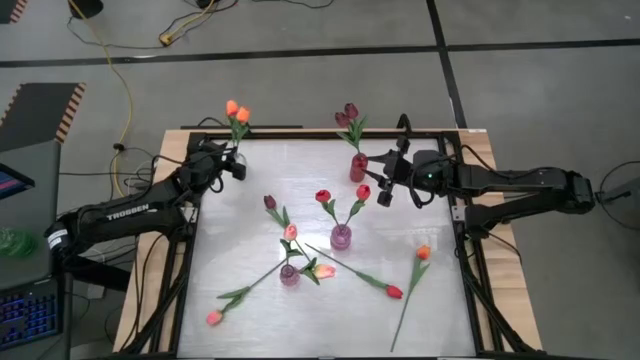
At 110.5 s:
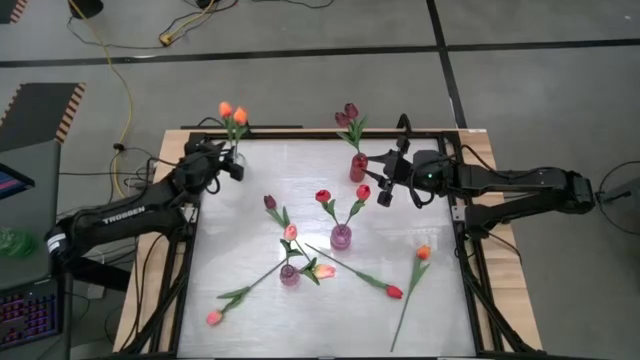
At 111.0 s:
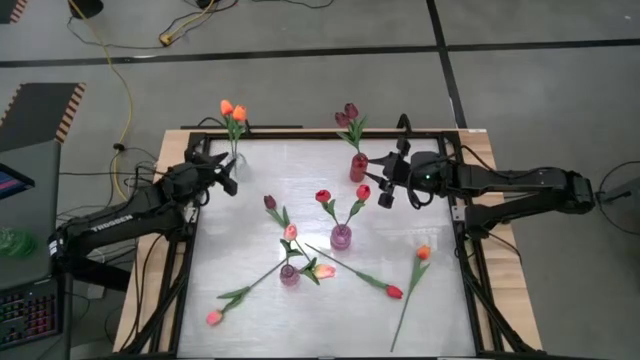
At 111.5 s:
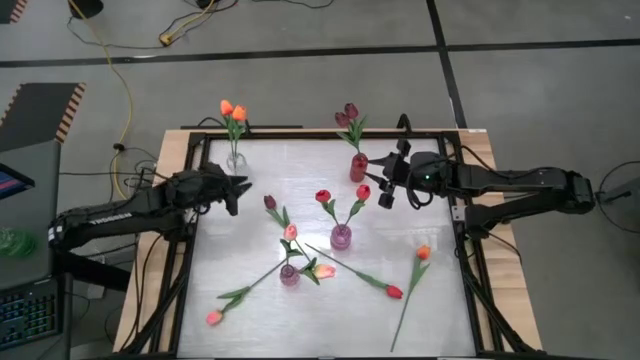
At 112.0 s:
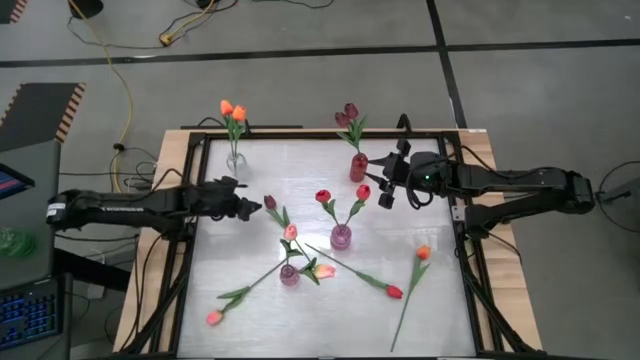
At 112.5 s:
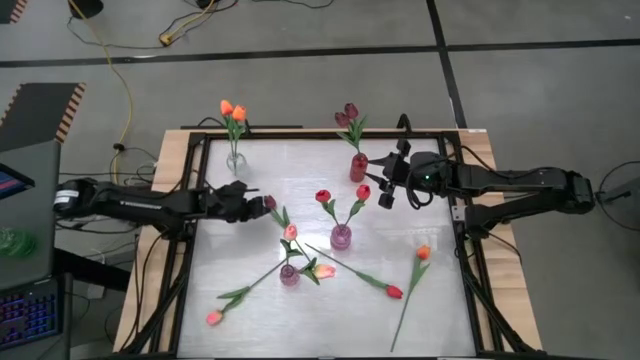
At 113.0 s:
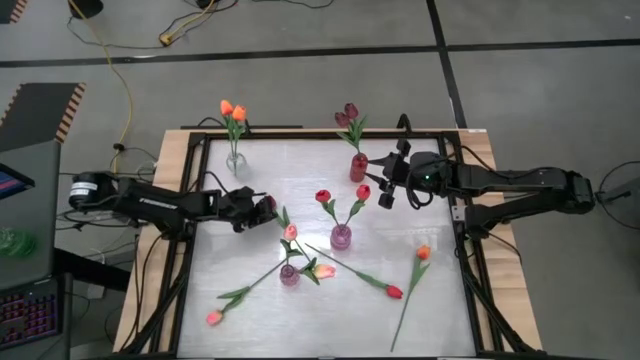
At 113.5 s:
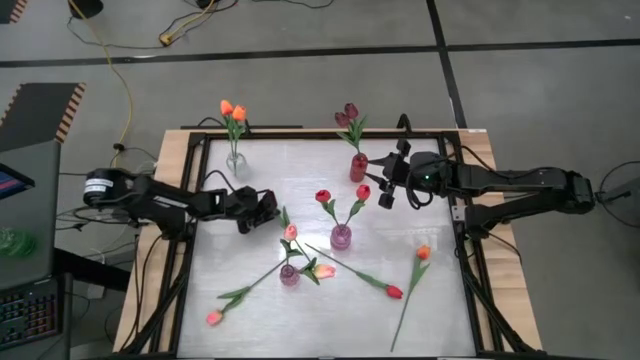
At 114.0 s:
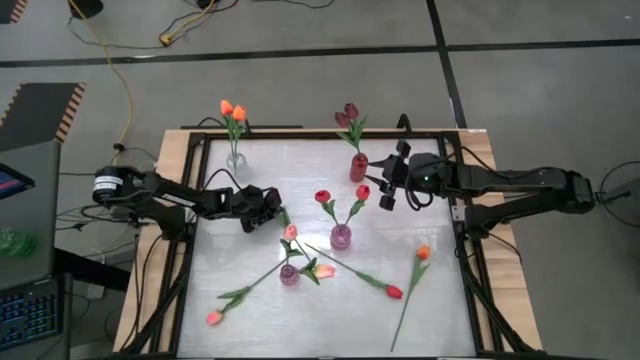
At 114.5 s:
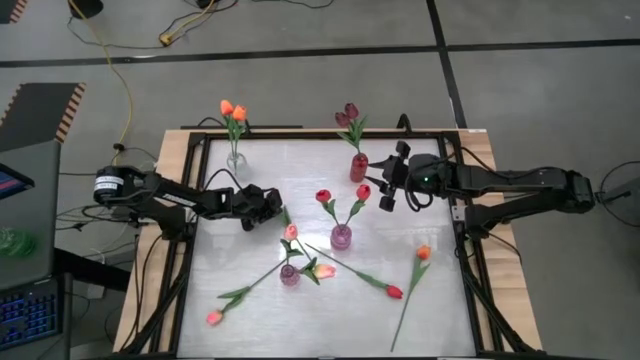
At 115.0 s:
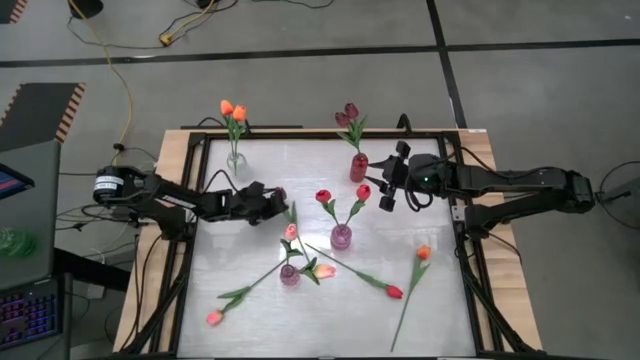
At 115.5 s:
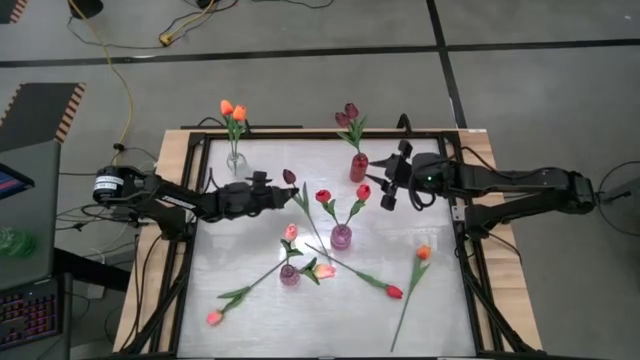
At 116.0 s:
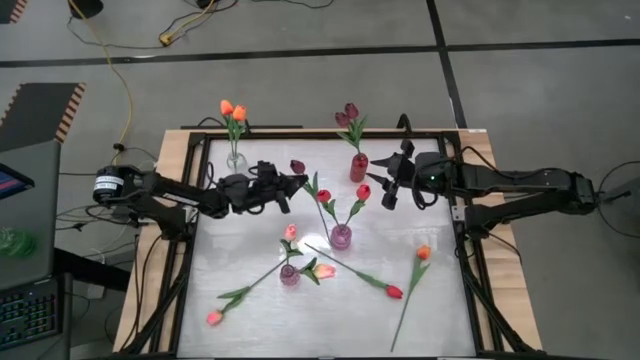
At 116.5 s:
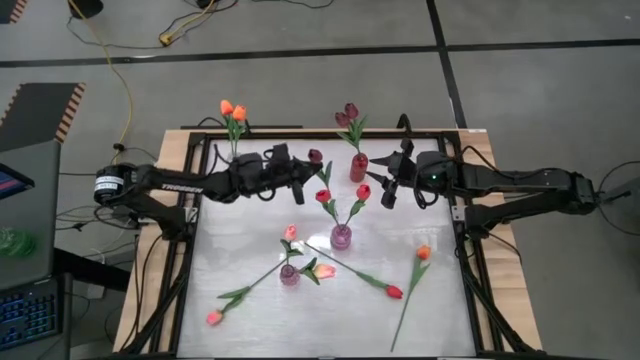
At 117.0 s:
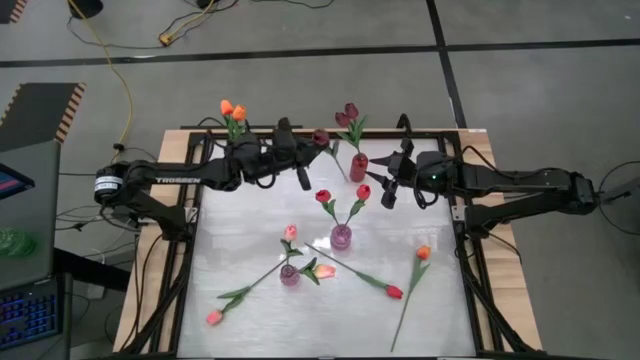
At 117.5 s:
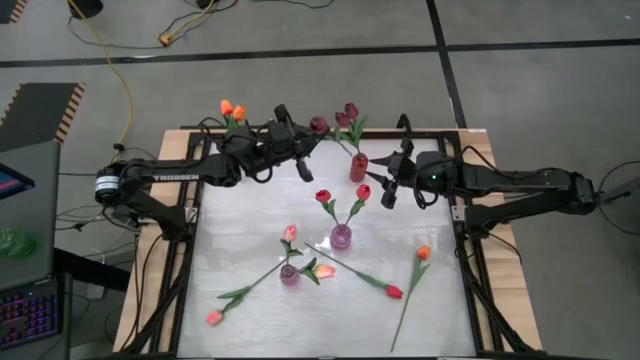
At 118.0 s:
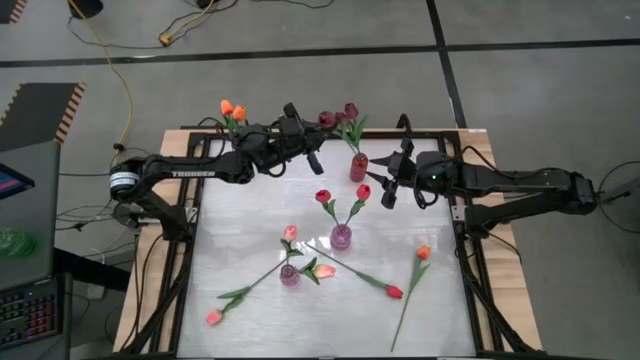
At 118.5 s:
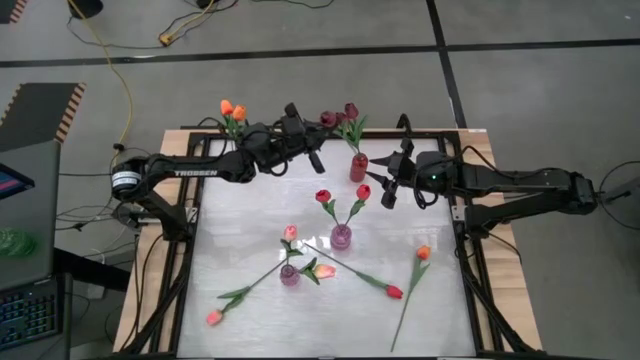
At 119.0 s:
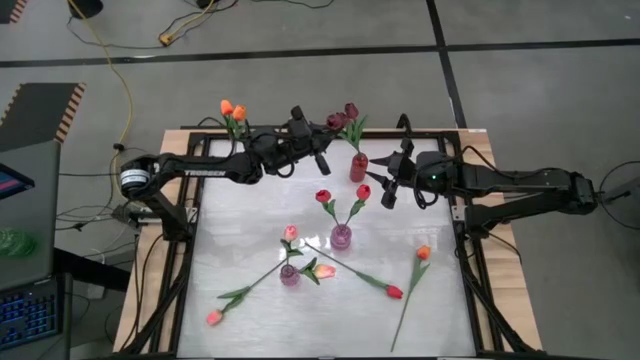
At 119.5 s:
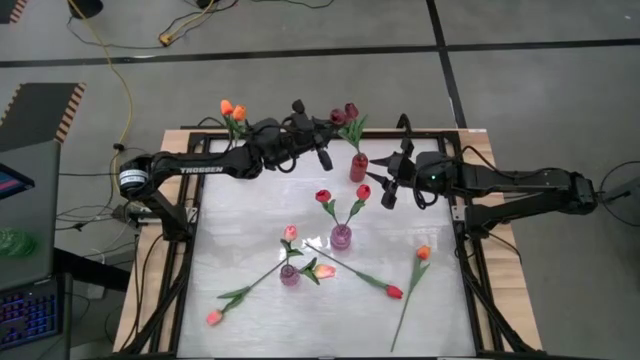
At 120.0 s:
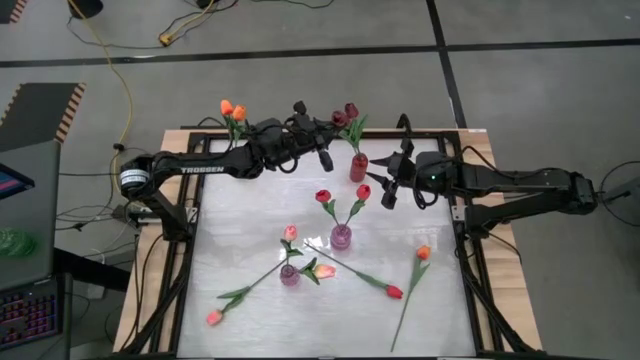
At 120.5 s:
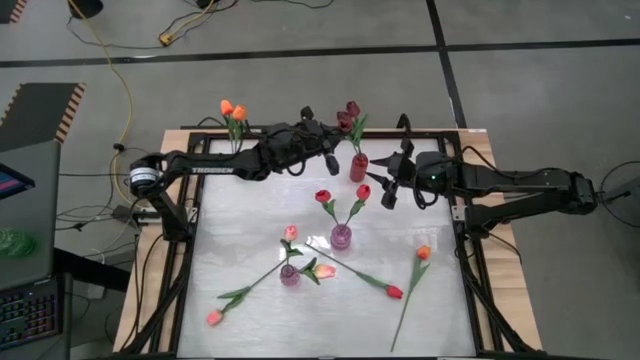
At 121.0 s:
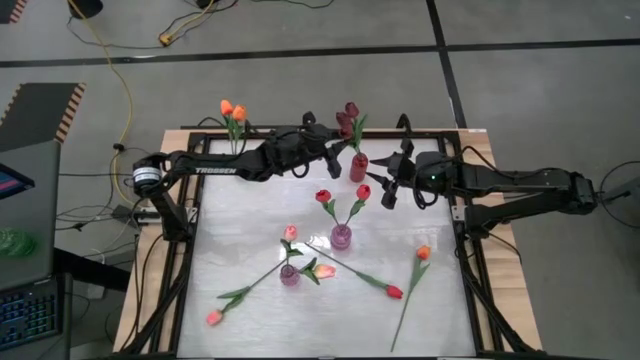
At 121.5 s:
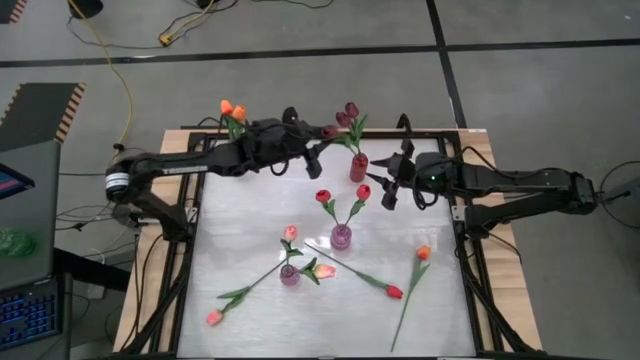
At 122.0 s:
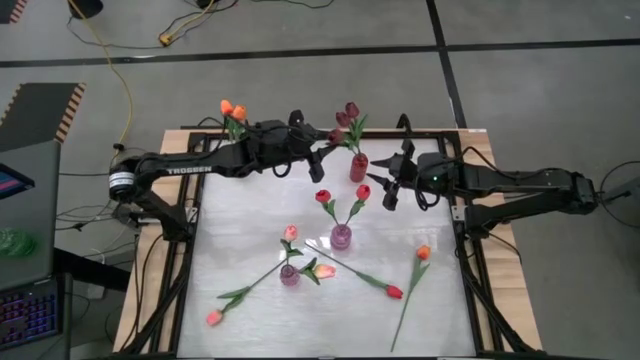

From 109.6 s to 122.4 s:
Task: Sort flowers into vase by color
Put the dark red flower into the red vase

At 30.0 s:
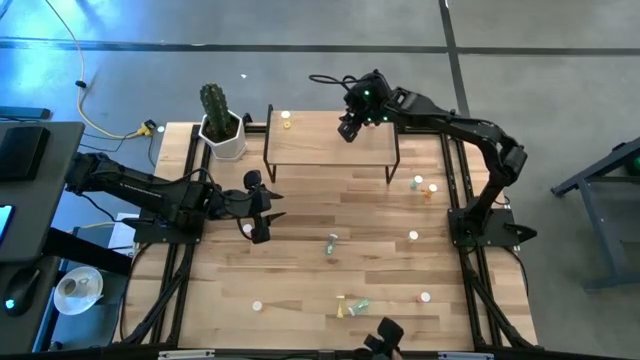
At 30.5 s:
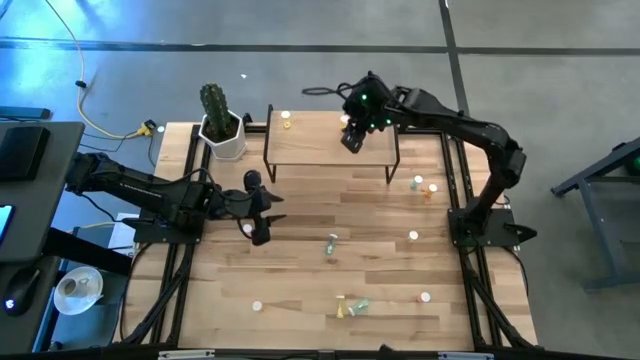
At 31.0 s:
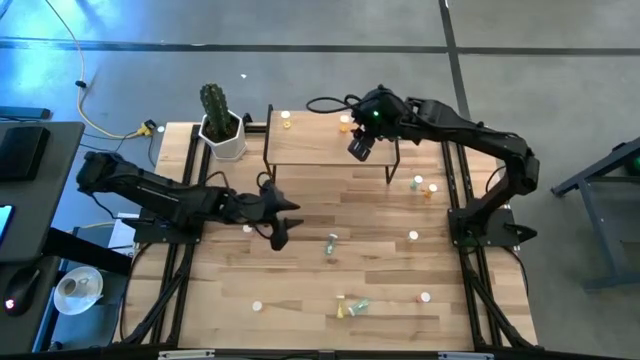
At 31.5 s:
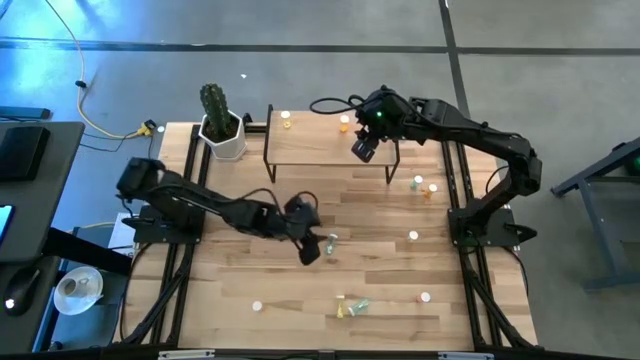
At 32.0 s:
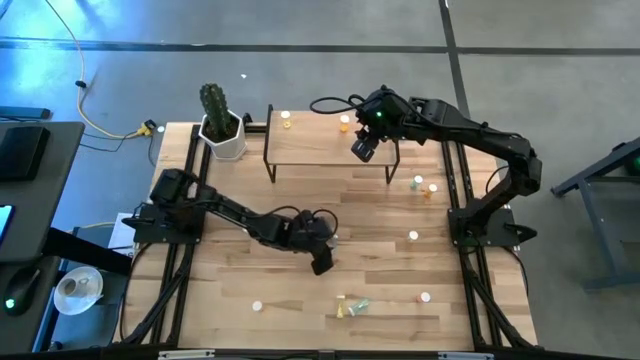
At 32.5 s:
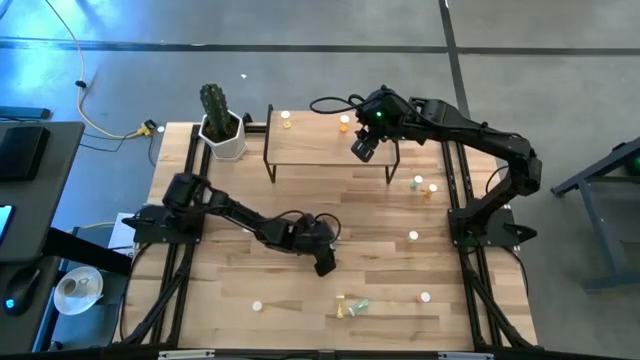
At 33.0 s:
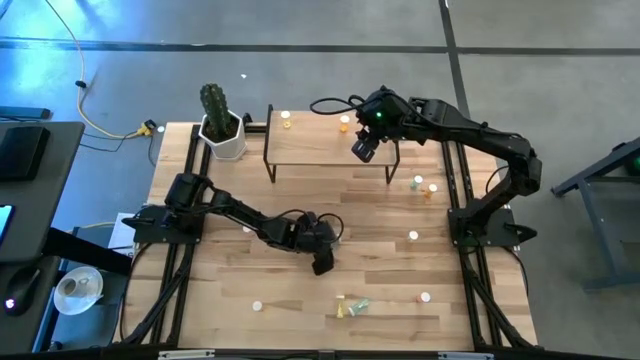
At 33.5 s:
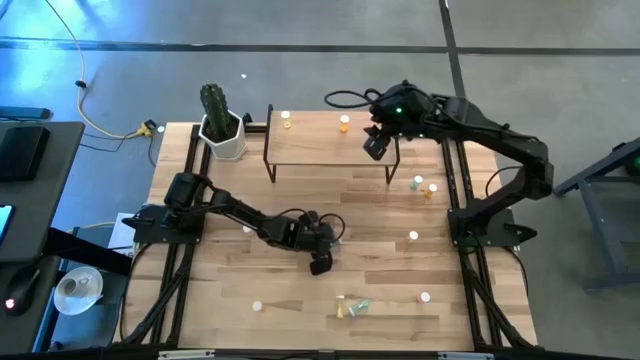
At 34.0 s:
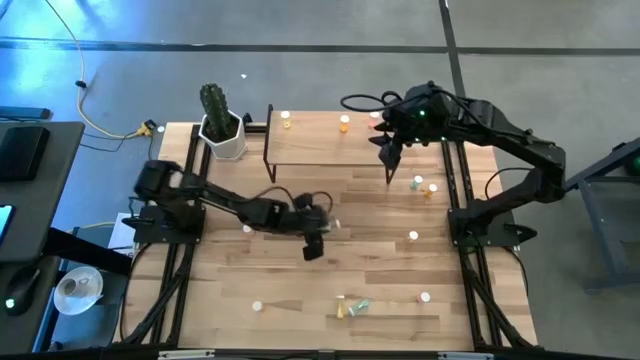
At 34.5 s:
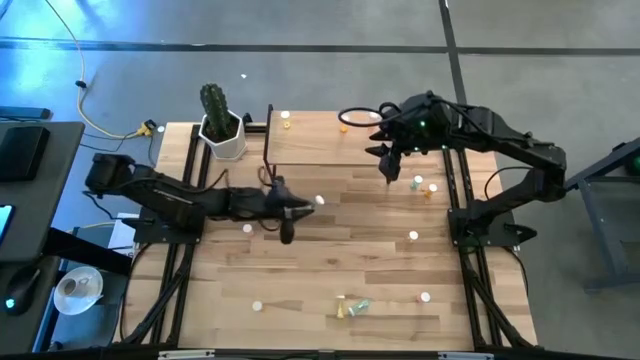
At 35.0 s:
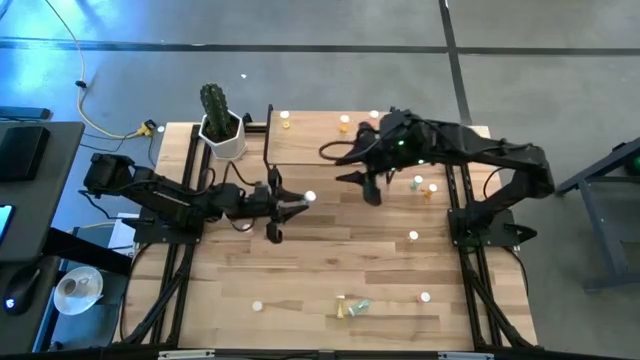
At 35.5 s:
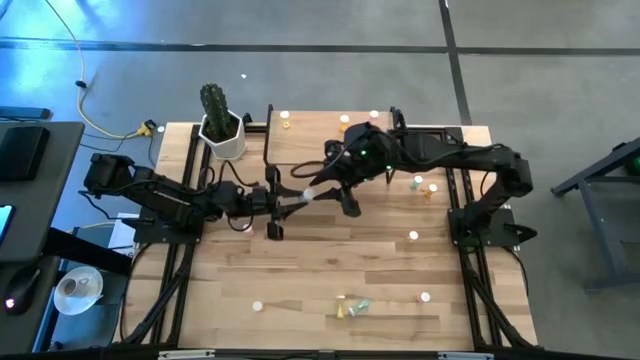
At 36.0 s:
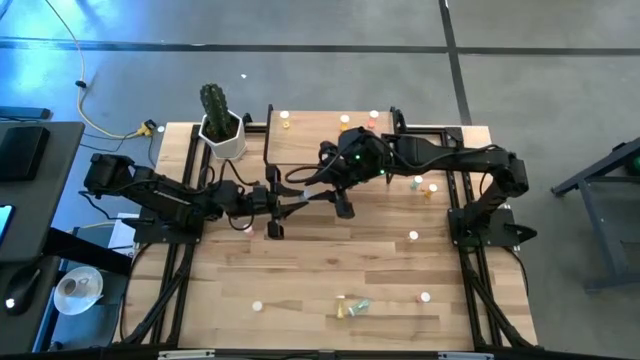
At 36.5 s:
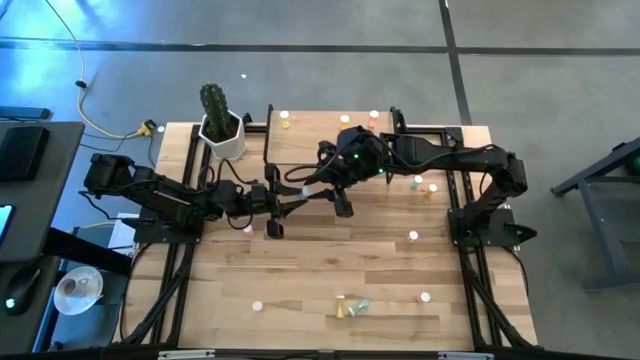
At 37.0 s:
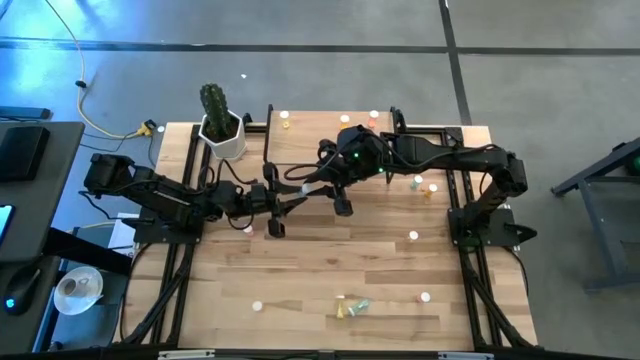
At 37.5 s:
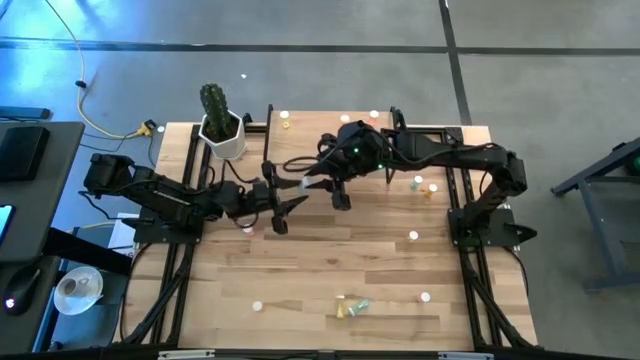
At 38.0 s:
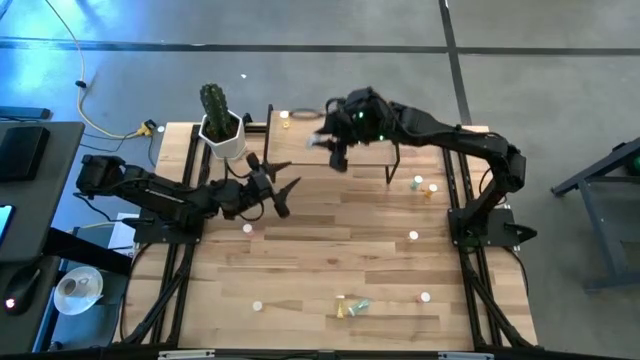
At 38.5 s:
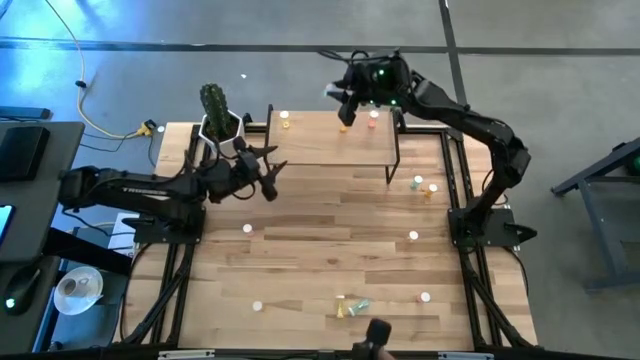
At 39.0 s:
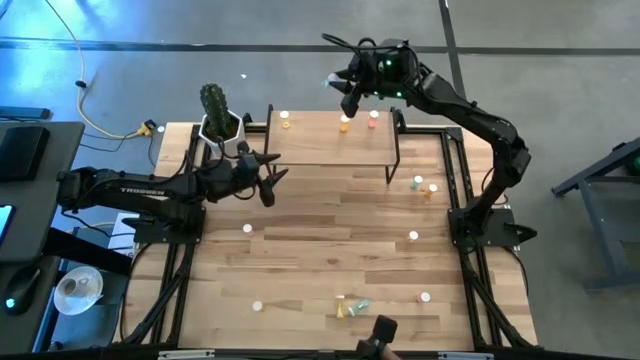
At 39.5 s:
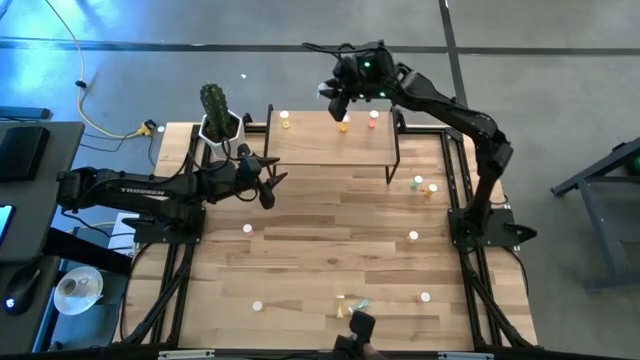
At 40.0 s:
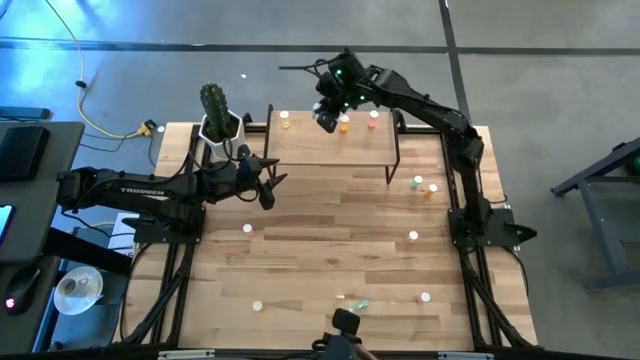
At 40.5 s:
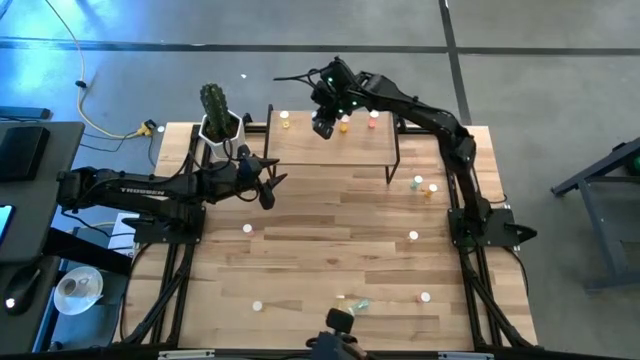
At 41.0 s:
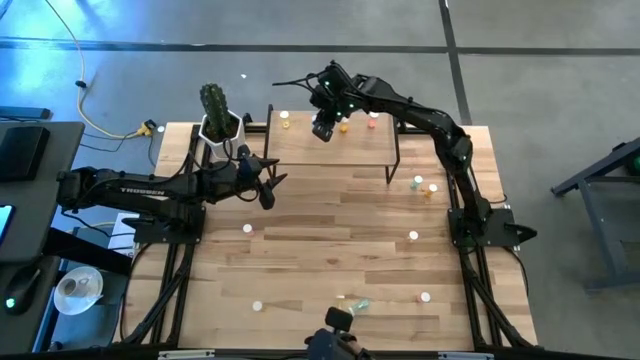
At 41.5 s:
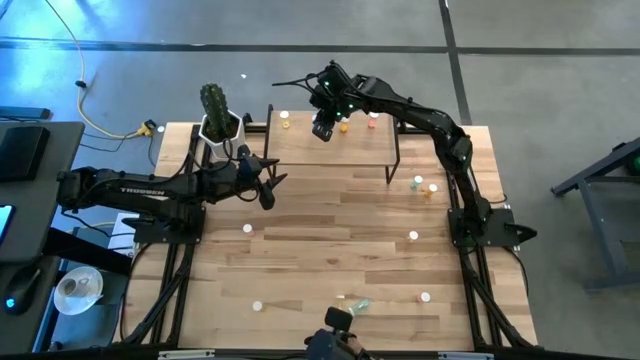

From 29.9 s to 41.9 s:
Task: Pick and place medicine bottles onto shelf by color
Put the middle blue pill bottle on the shelf
